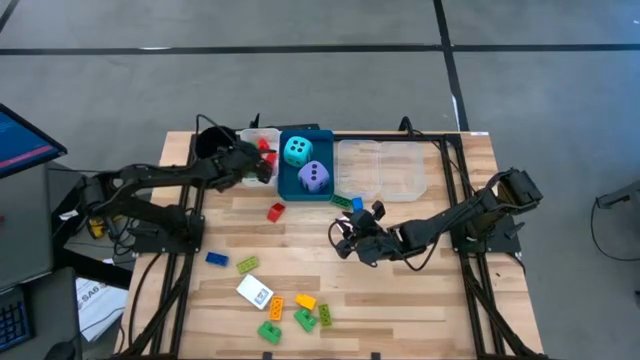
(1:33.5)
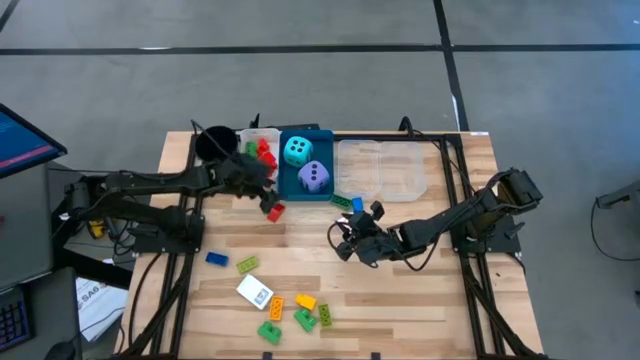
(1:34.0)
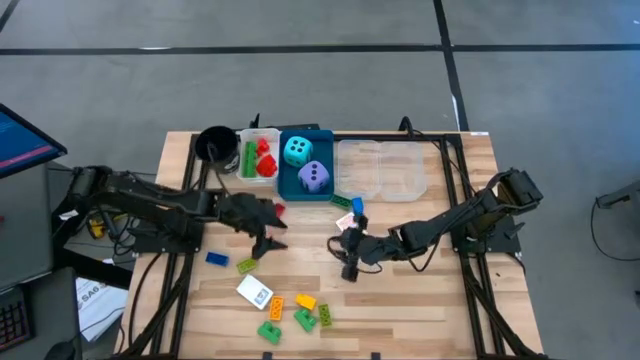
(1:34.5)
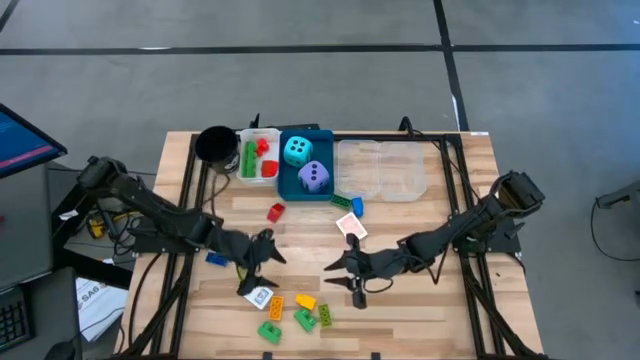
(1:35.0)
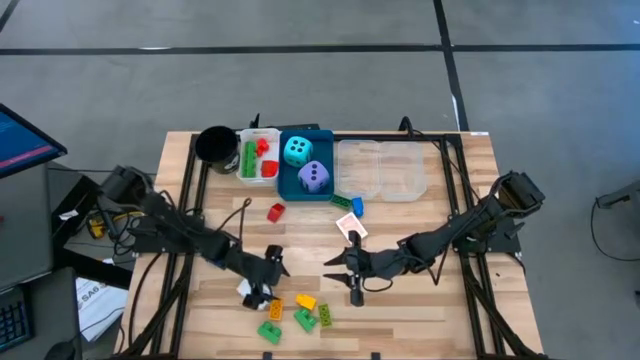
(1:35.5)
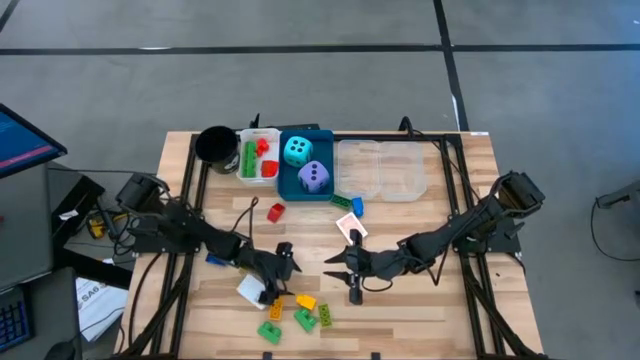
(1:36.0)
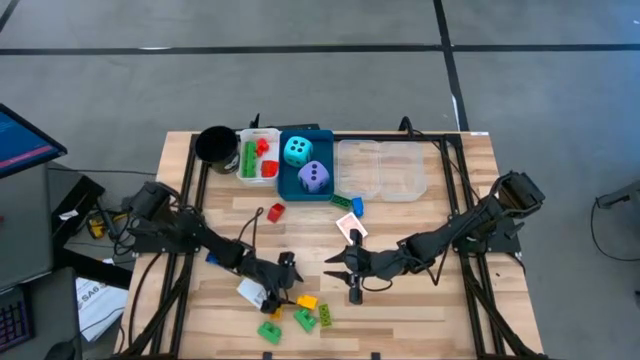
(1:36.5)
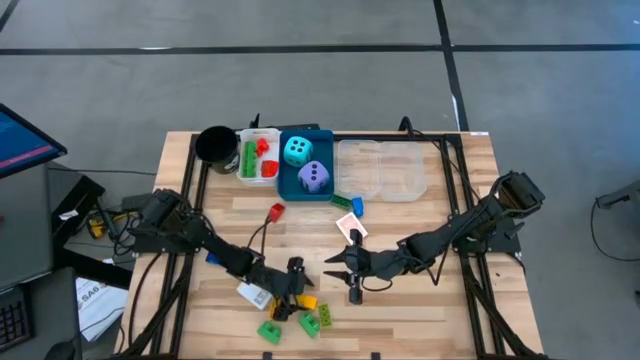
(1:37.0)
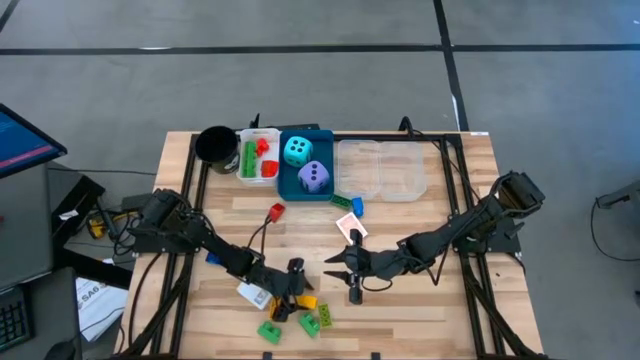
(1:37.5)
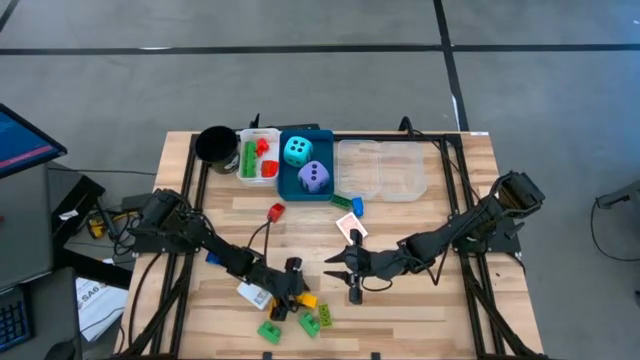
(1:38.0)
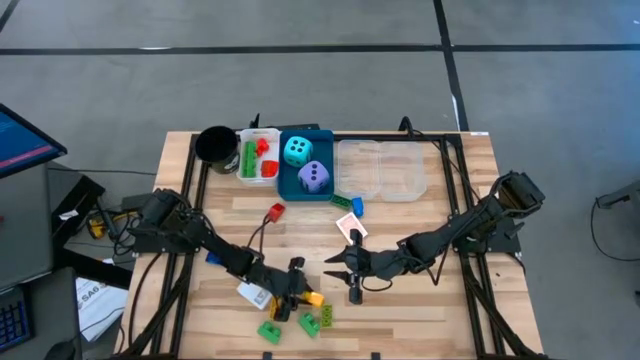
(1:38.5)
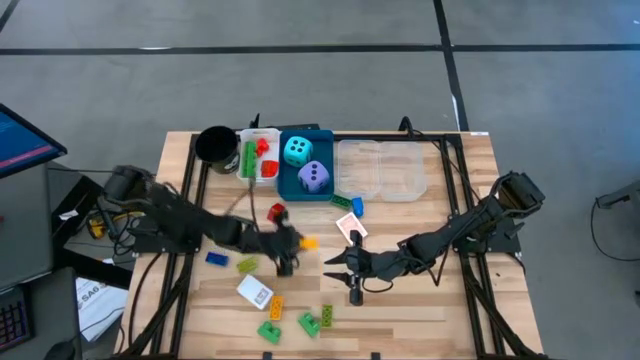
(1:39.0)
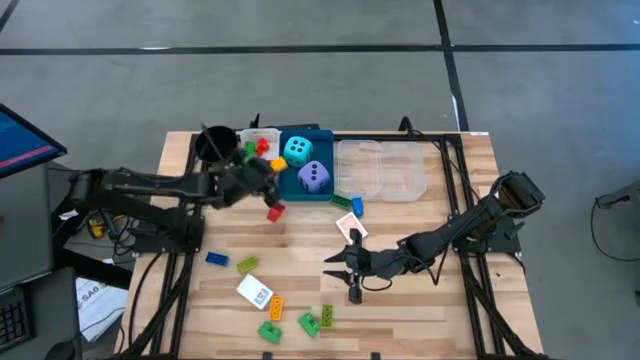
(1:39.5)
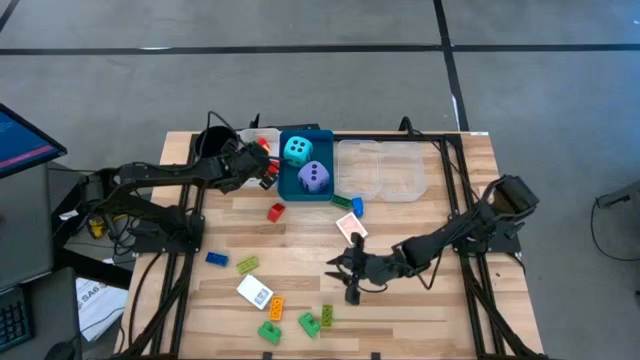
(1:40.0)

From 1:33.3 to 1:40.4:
Task: Pick & Place Toys
Put the large yellow game piece into the white bin

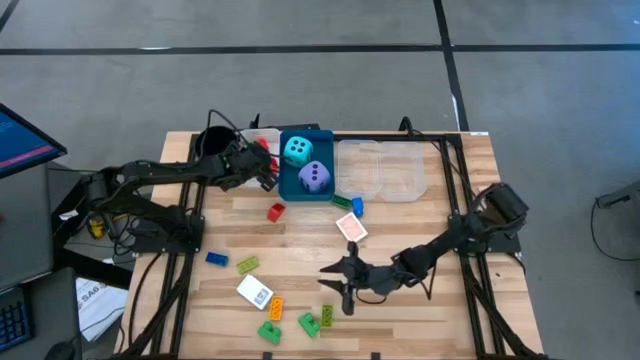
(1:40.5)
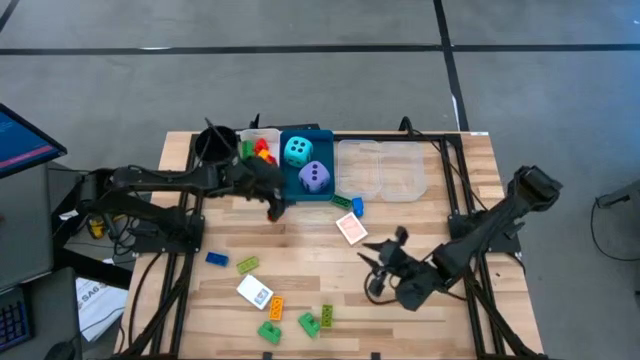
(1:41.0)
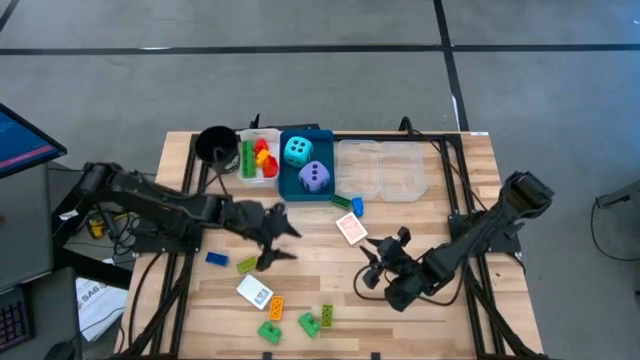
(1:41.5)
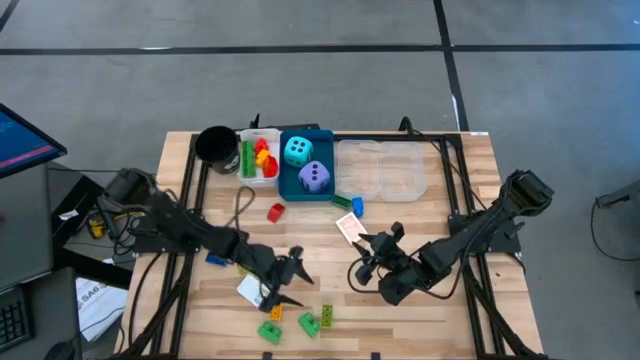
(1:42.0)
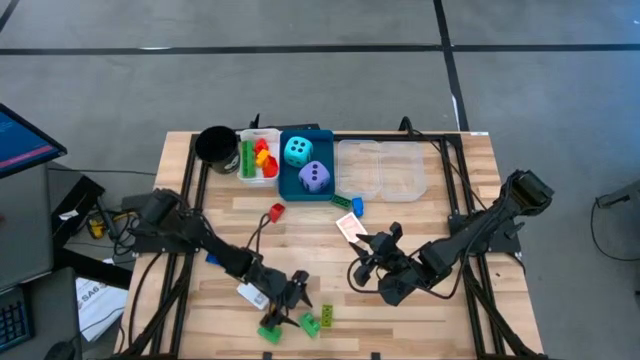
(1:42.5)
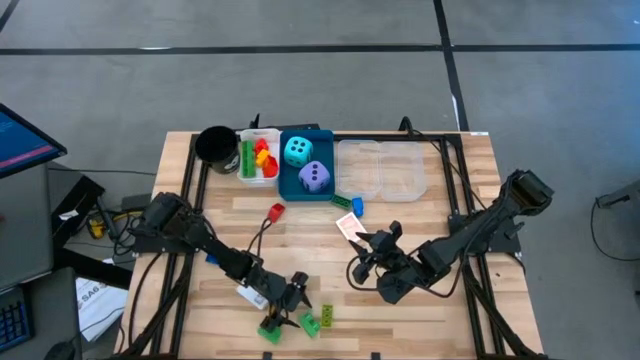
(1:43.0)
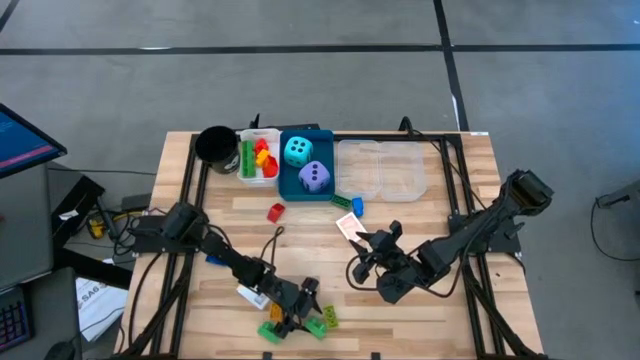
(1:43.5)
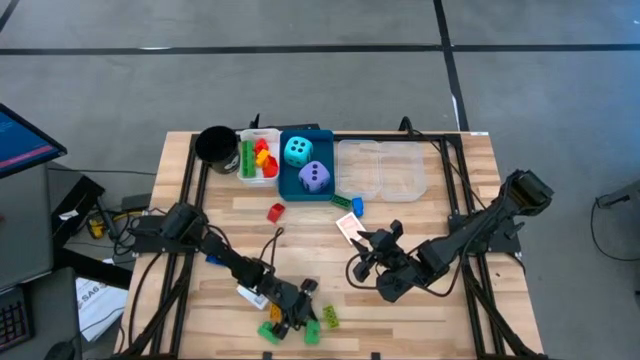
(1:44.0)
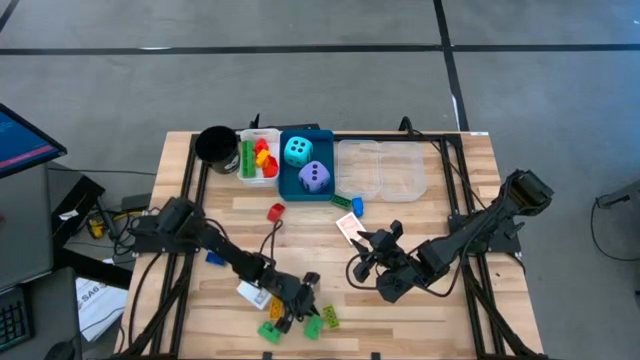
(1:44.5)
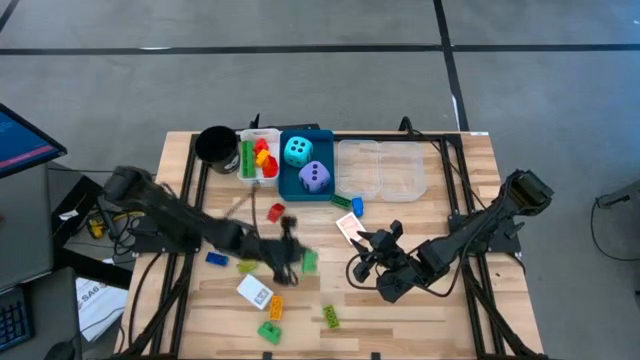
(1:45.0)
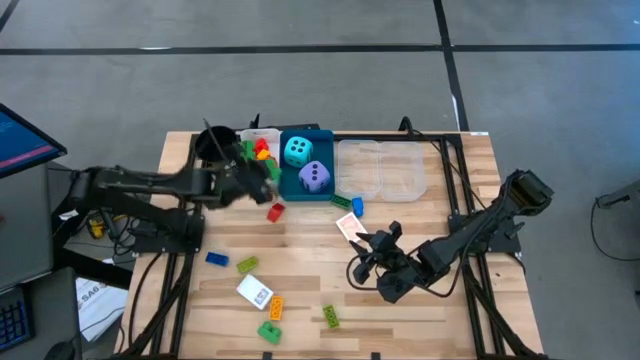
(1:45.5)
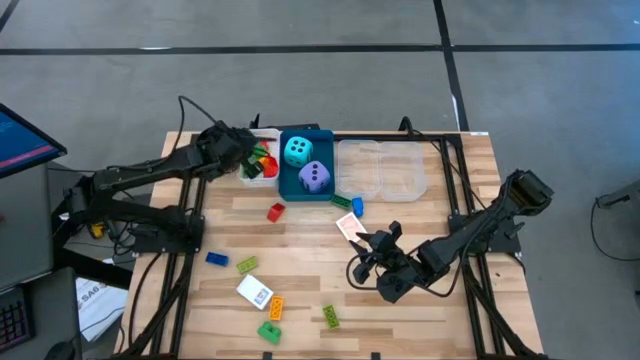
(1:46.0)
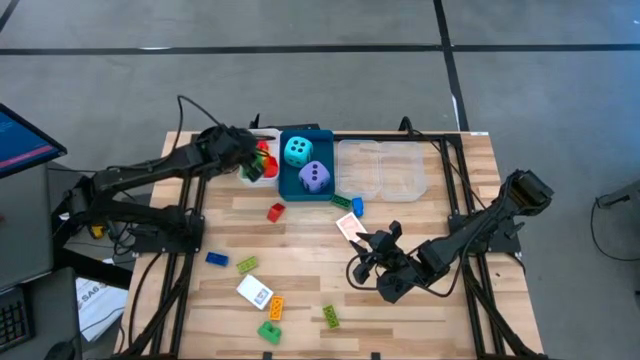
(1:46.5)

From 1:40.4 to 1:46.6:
Put the large green game piece into the white bin

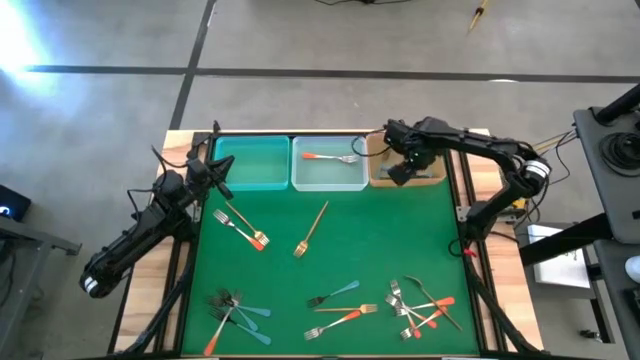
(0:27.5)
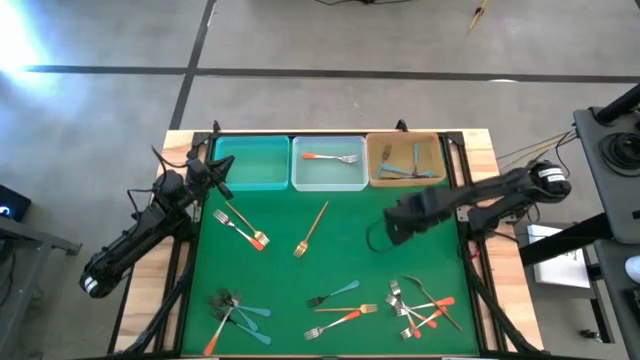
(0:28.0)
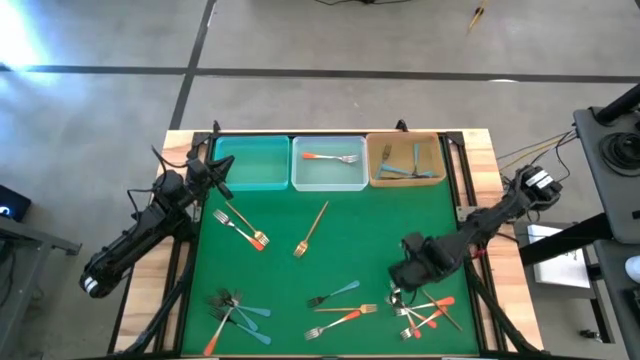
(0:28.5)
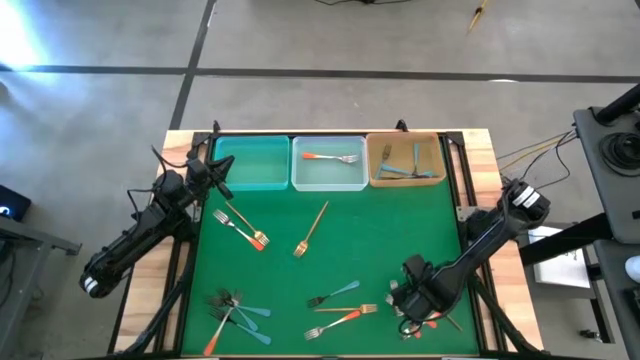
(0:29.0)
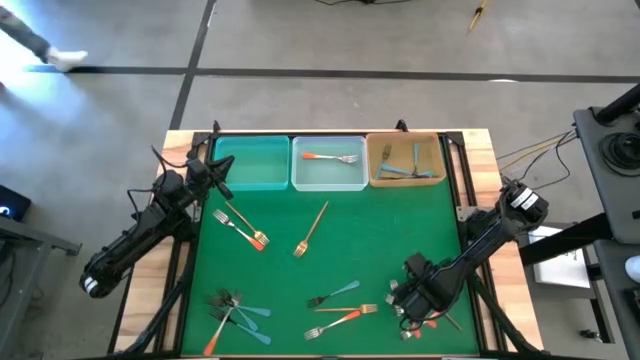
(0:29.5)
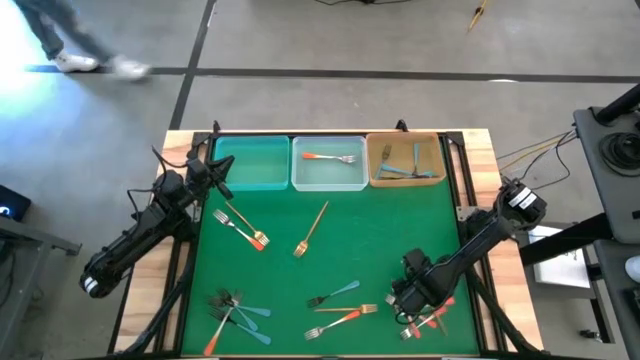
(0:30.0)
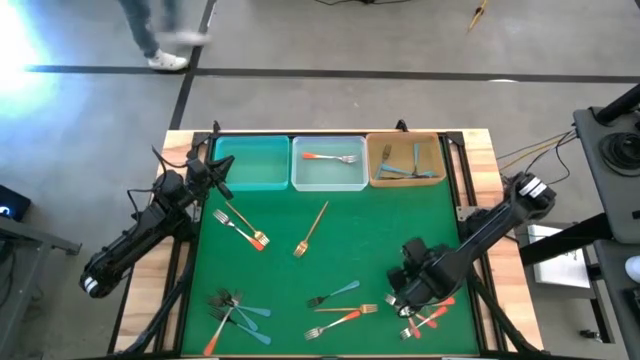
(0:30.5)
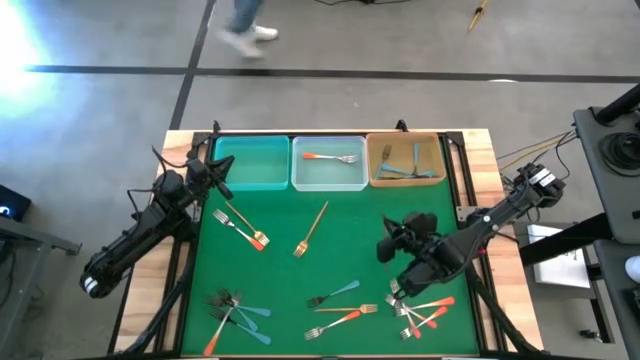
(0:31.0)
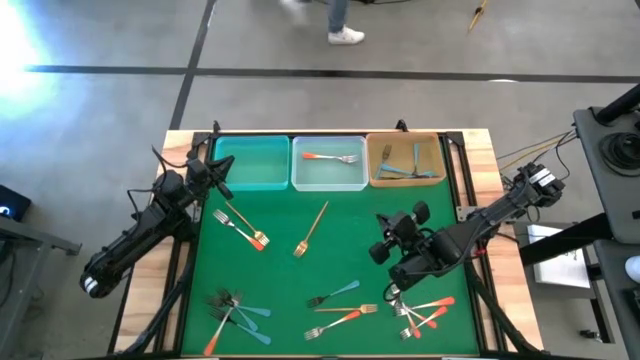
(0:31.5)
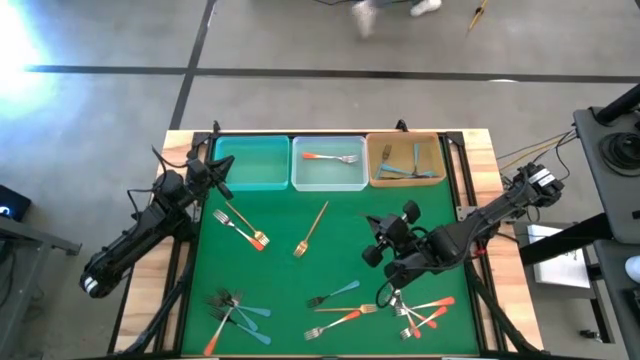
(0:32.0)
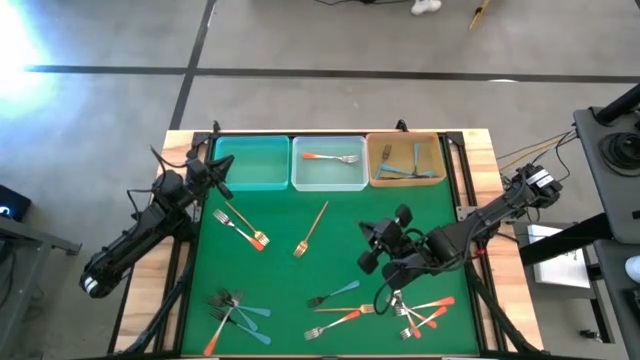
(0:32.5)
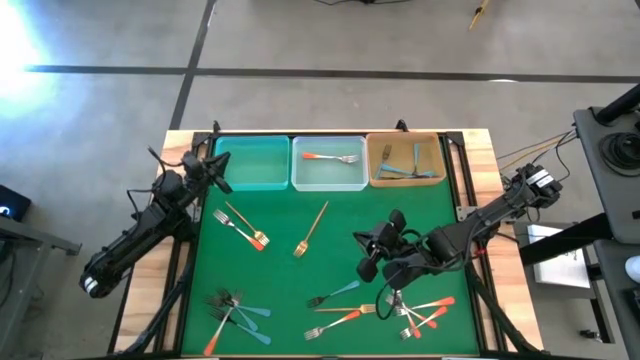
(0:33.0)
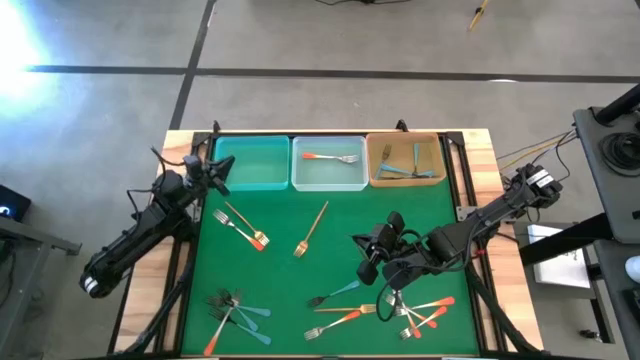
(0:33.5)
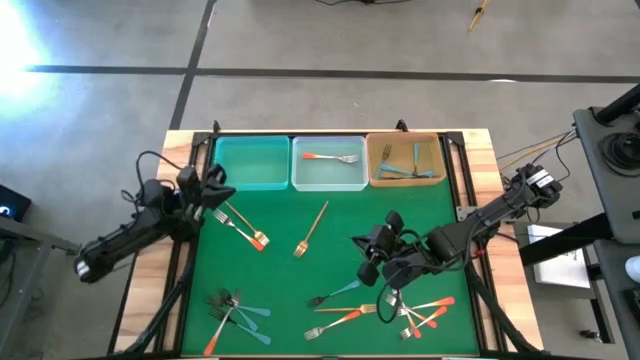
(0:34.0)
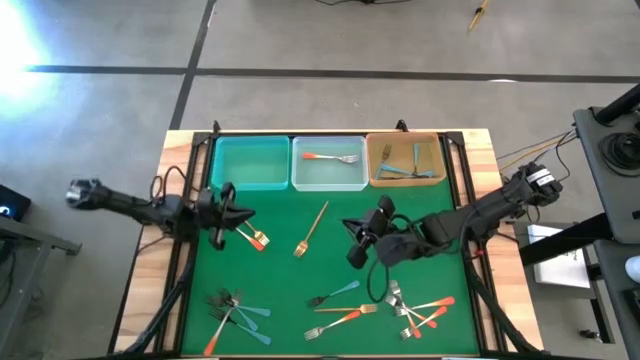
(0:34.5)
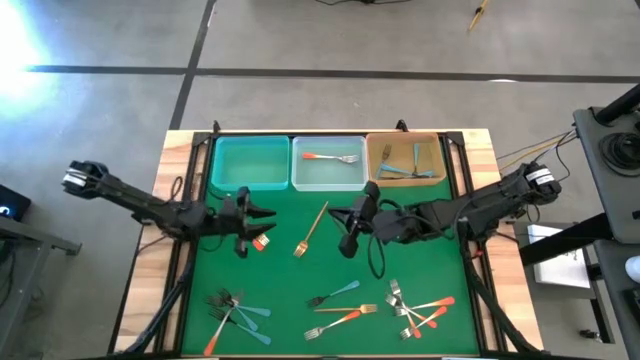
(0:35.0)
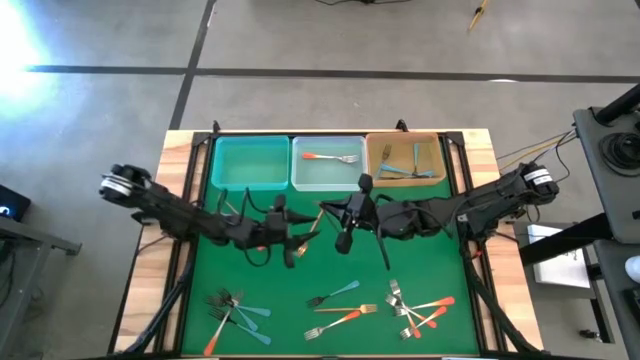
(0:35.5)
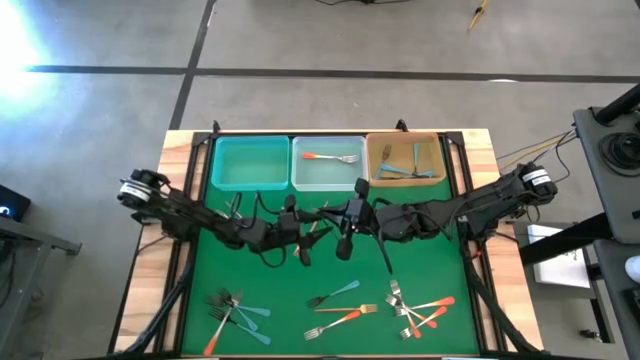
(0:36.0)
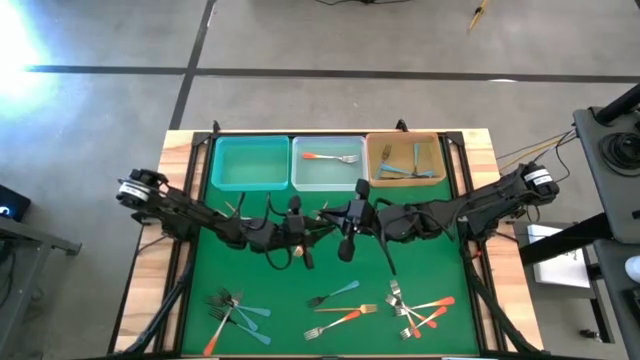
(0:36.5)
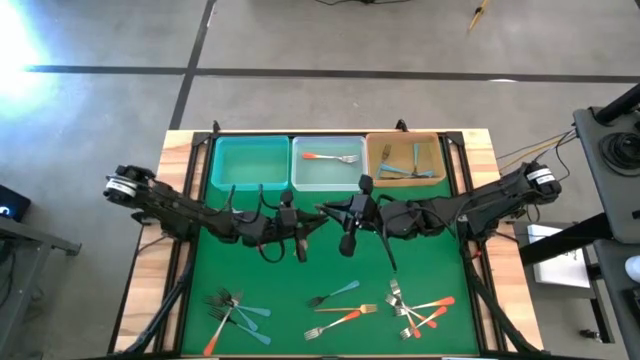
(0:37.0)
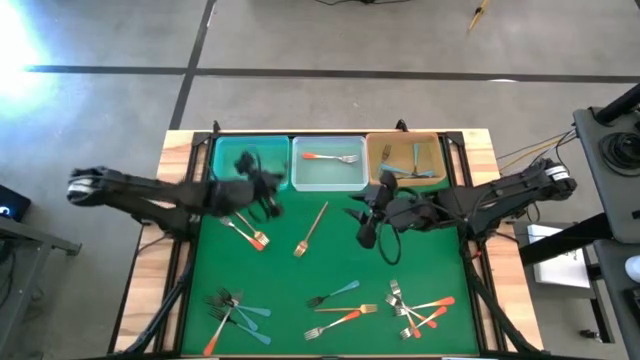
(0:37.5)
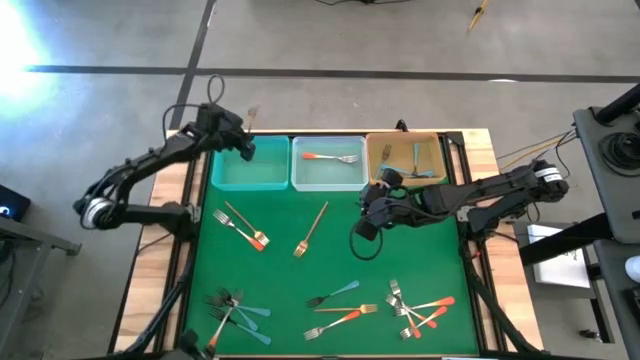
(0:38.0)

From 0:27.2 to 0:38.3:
Task: Sort silverware by color (type)
Put the gold fork into the blue bin
